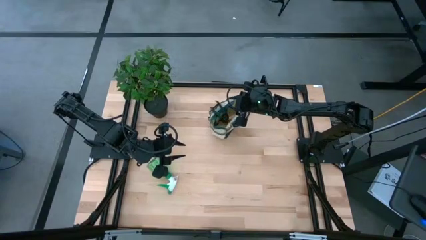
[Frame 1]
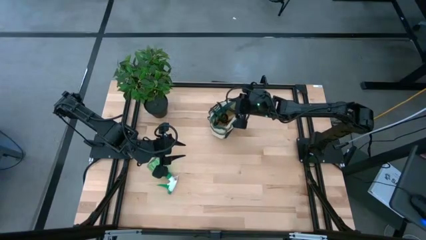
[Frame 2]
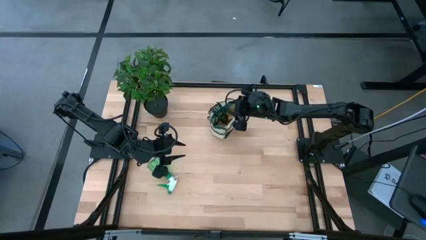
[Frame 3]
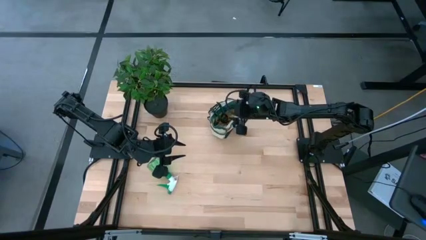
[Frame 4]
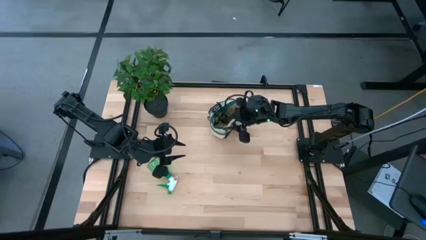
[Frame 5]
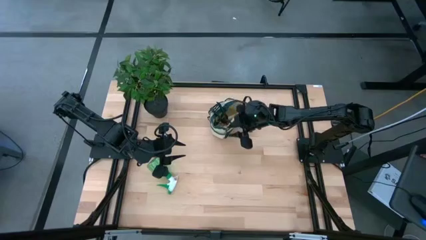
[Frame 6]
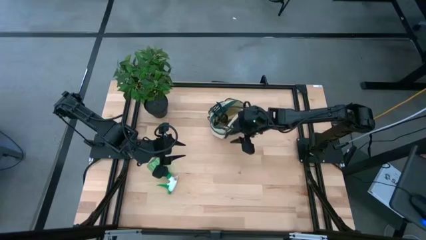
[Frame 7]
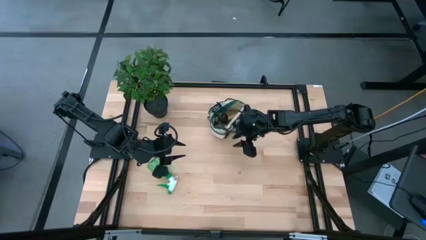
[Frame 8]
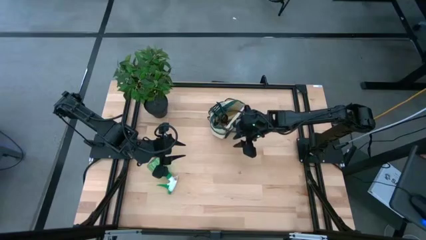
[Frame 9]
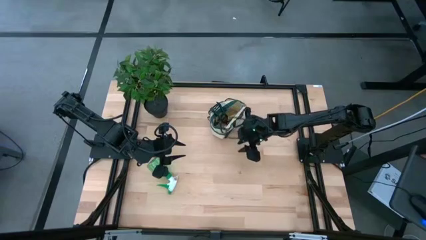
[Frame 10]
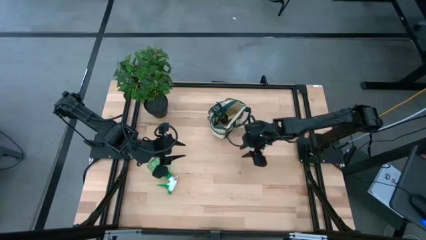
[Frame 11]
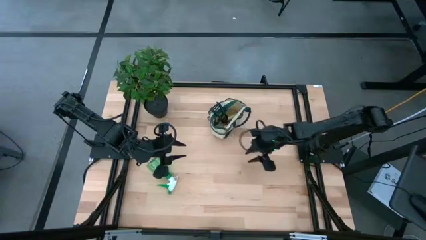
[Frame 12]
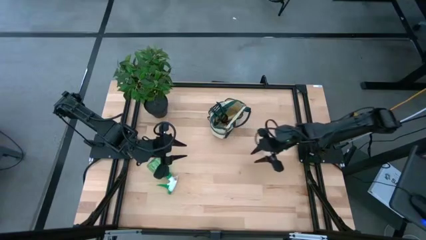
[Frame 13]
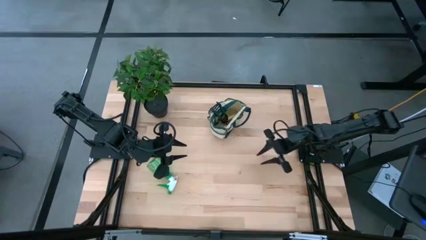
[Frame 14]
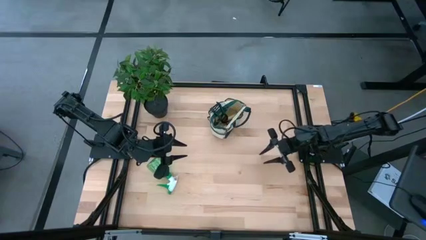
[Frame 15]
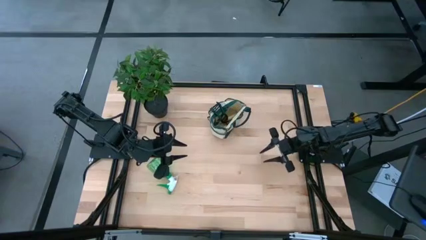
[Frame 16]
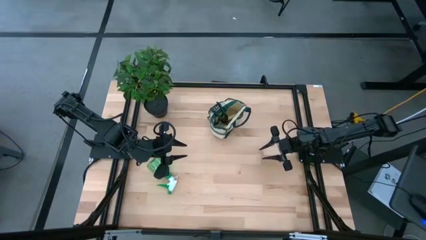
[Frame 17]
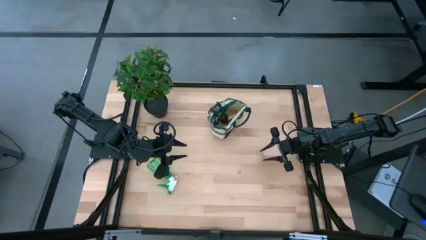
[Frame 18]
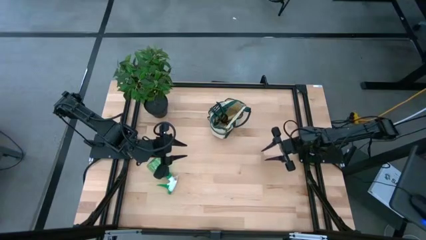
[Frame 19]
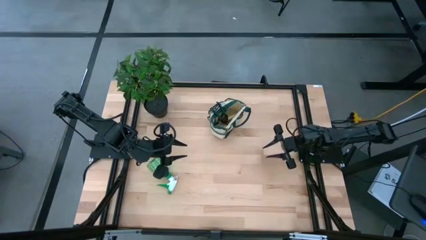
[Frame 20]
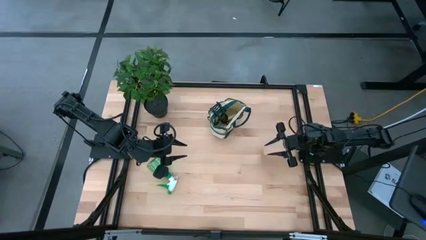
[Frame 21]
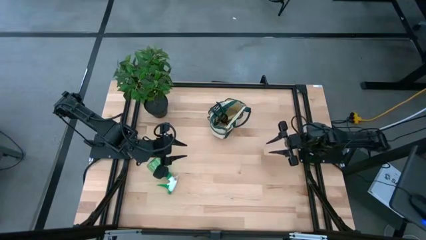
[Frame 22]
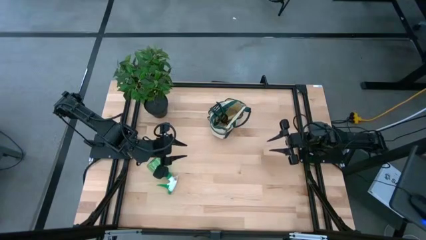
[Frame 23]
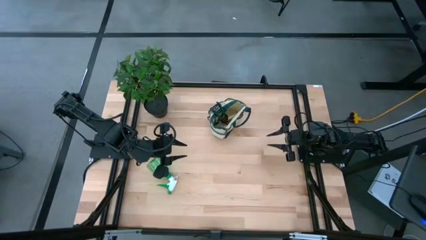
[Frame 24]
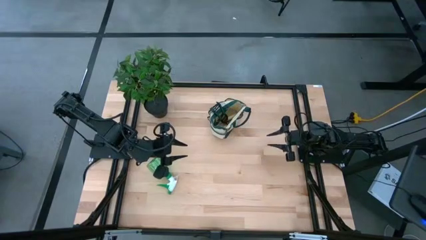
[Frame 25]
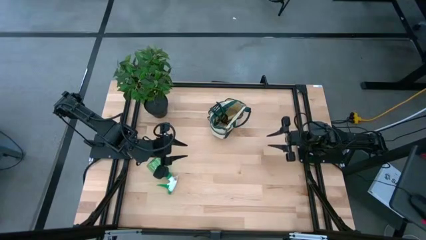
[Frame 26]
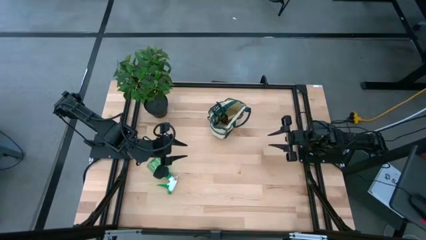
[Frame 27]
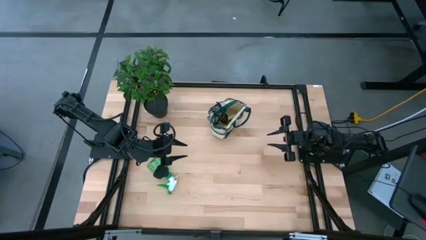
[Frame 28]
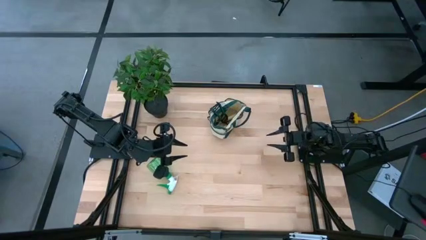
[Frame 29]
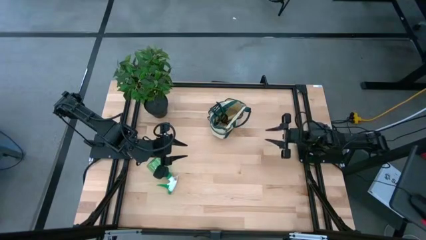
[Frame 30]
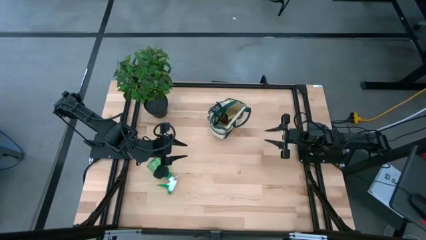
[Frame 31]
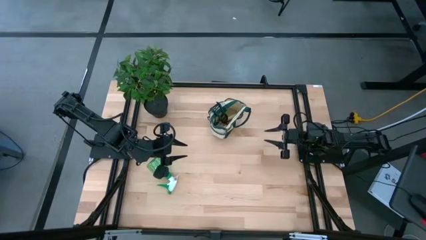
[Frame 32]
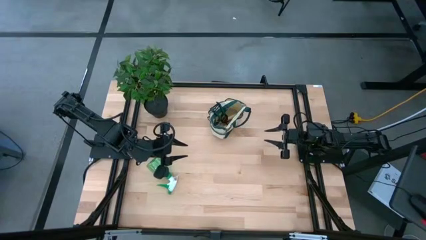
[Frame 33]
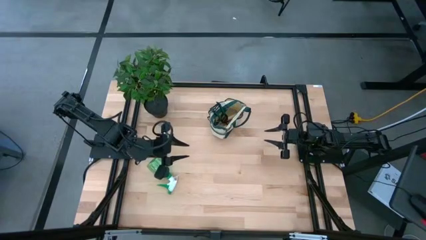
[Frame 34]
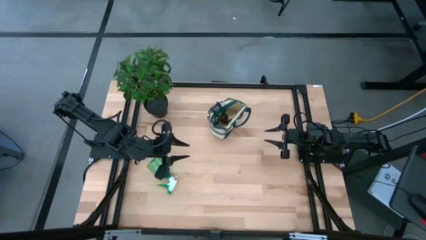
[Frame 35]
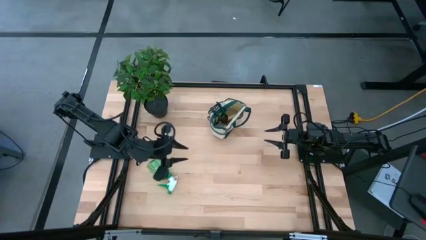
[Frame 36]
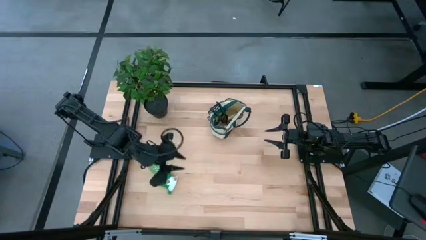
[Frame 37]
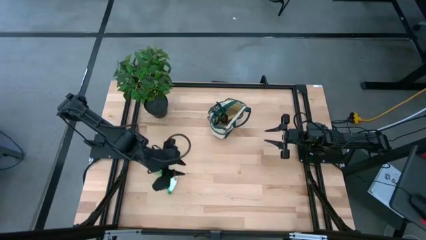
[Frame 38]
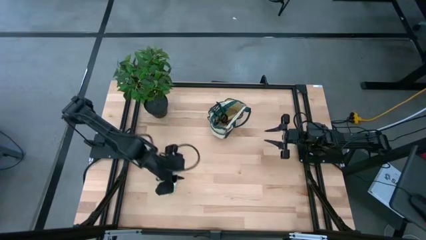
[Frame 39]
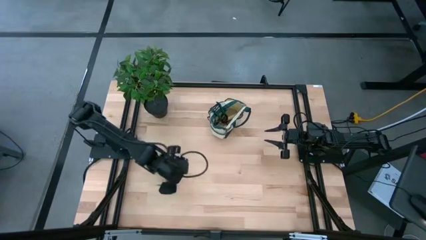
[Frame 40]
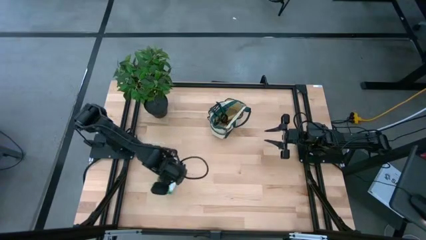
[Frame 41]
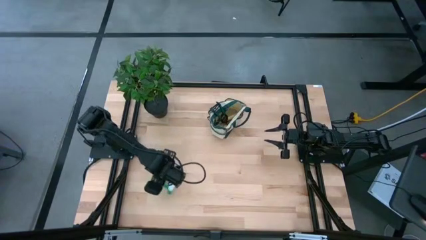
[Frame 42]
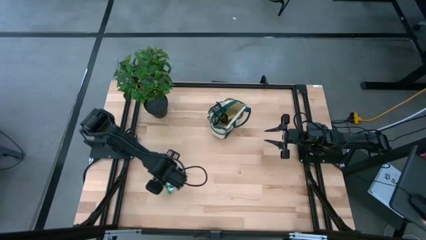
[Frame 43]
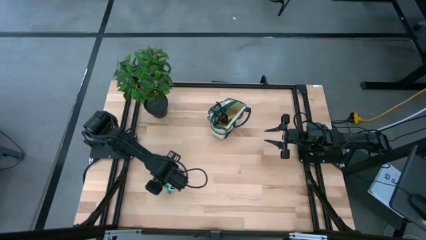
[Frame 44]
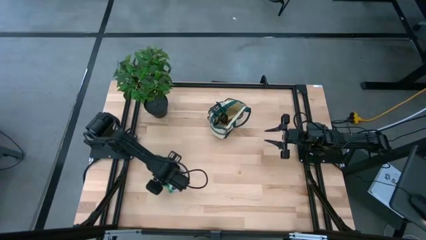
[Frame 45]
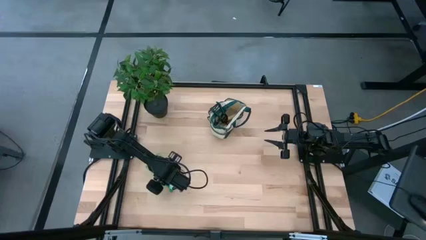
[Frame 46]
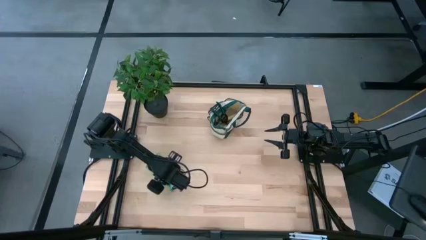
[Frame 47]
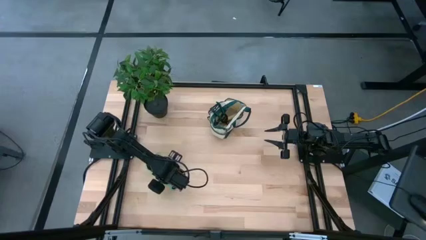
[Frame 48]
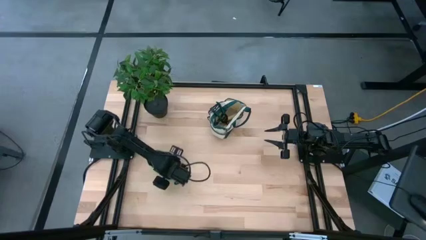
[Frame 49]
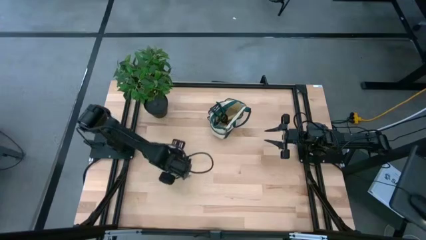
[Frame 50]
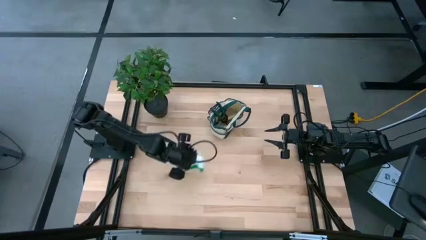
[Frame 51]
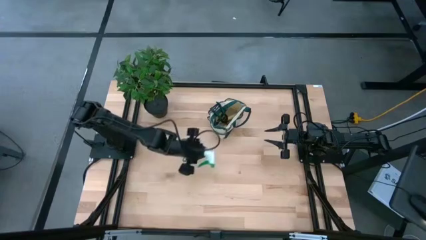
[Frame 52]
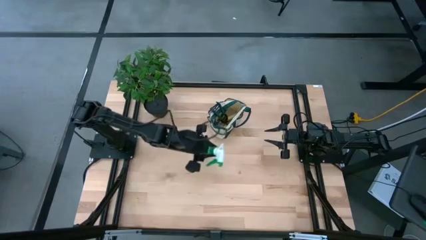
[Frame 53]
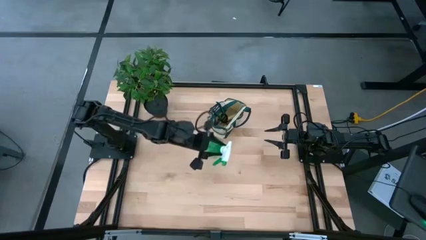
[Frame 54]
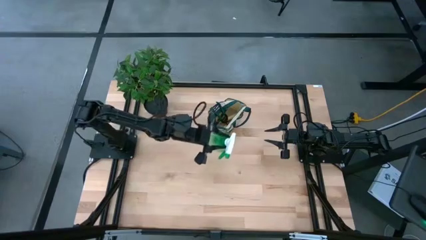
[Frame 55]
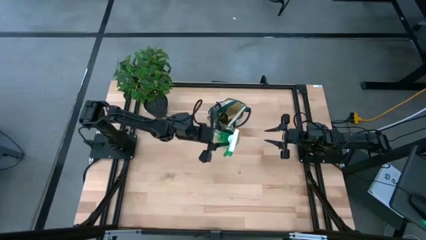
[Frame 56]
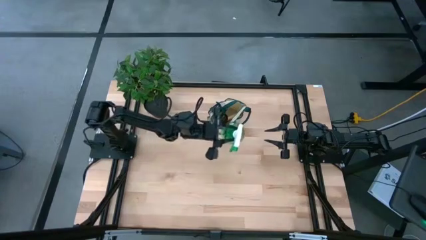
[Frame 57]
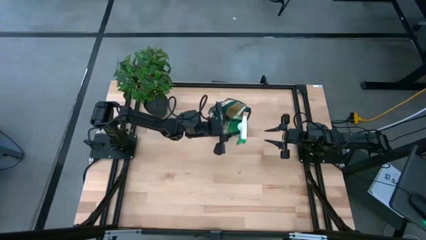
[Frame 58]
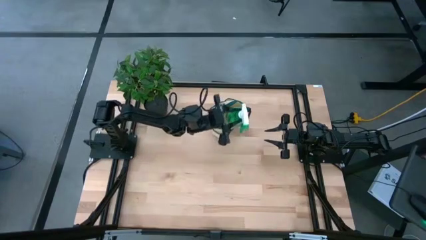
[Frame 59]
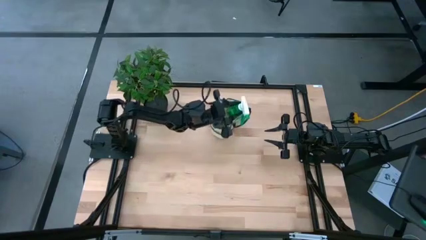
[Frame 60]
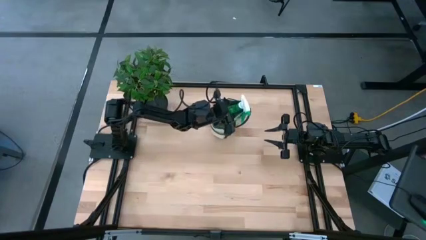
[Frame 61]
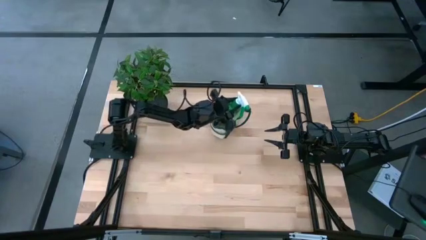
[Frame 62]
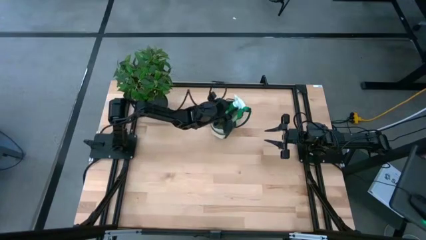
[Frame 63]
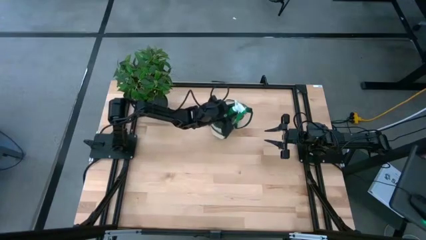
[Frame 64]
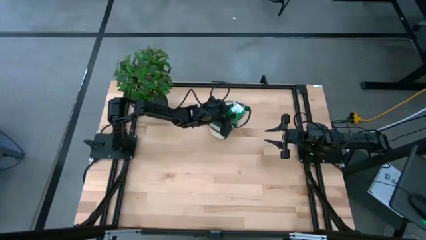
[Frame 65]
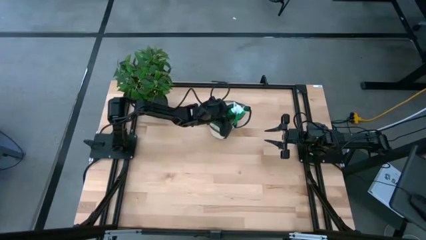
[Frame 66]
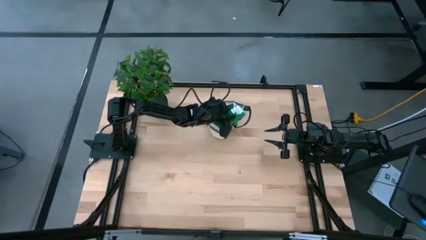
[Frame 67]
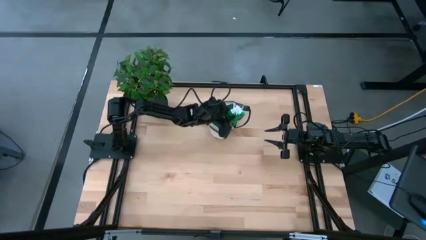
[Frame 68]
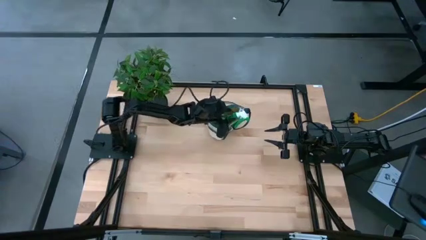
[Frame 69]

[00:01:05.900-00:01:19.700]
Task: Pick & Place Garden tools in Gardening bag
Put the green spray bottle into the green gardening bag

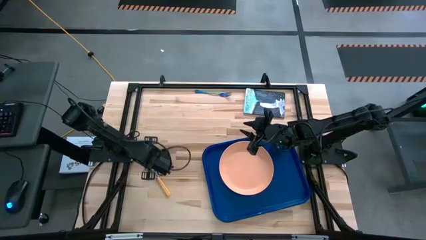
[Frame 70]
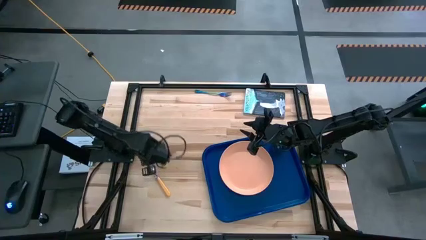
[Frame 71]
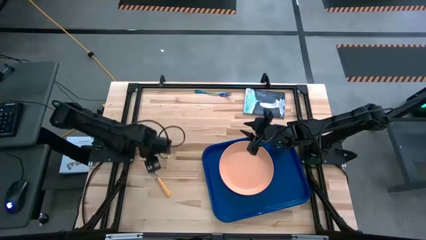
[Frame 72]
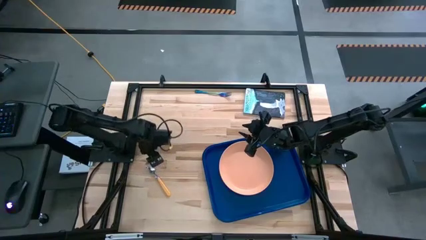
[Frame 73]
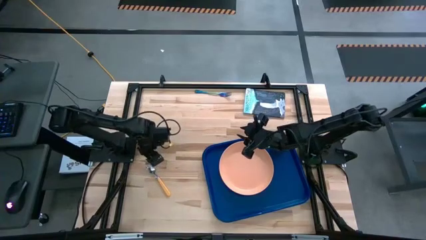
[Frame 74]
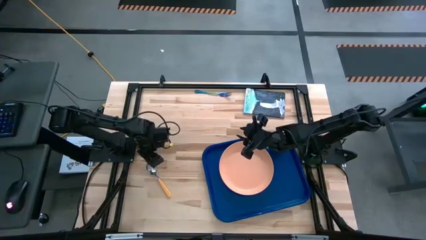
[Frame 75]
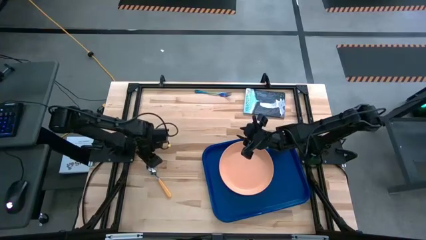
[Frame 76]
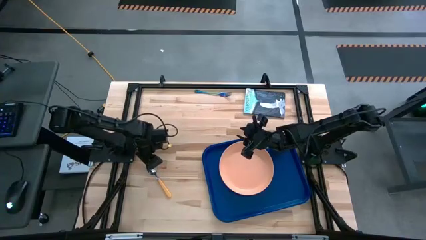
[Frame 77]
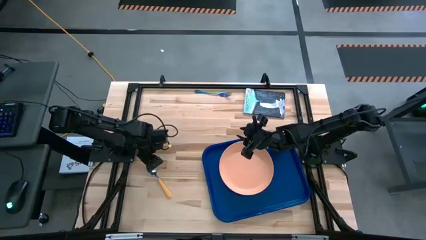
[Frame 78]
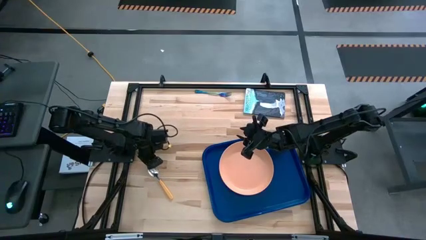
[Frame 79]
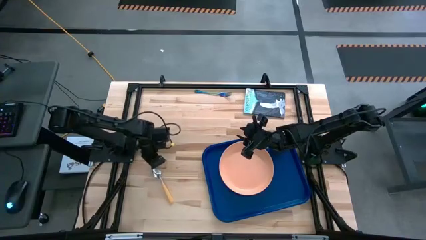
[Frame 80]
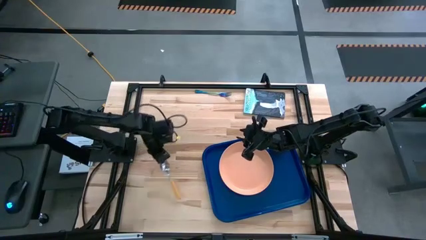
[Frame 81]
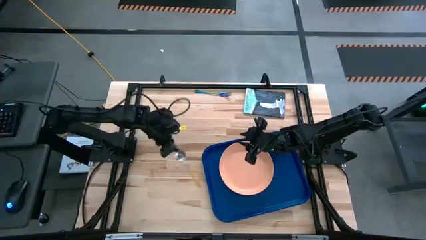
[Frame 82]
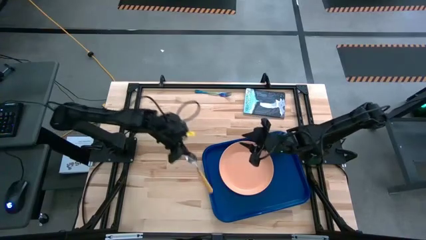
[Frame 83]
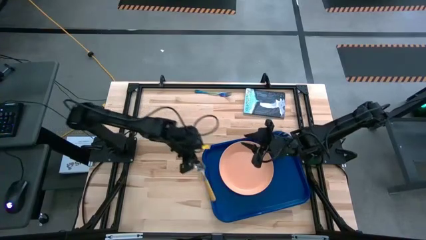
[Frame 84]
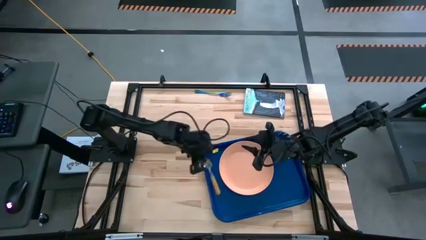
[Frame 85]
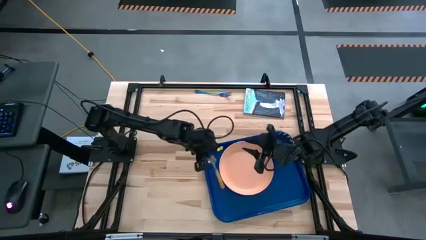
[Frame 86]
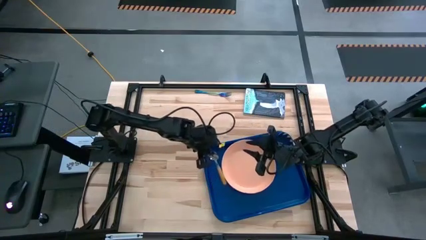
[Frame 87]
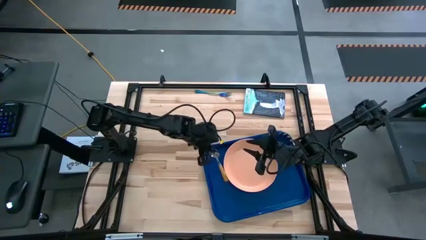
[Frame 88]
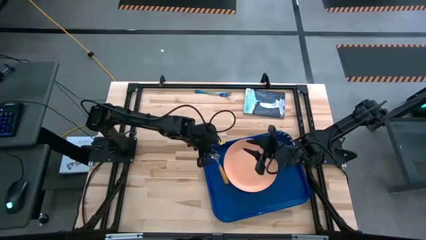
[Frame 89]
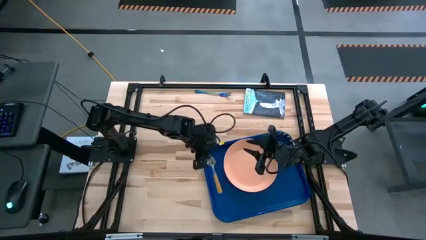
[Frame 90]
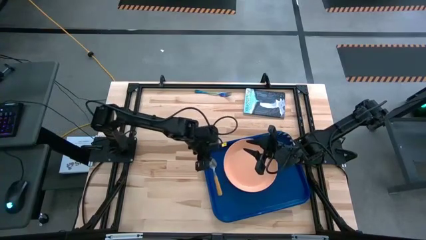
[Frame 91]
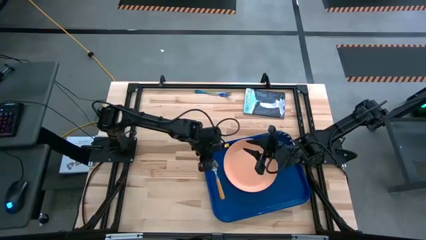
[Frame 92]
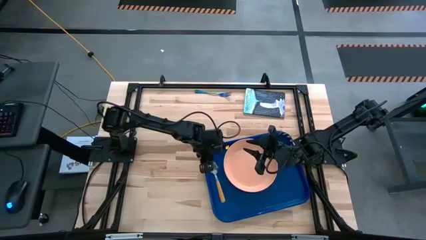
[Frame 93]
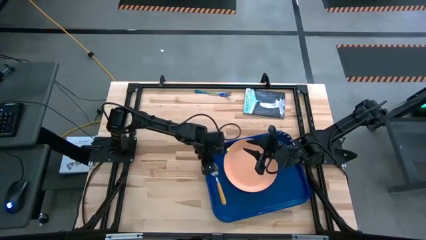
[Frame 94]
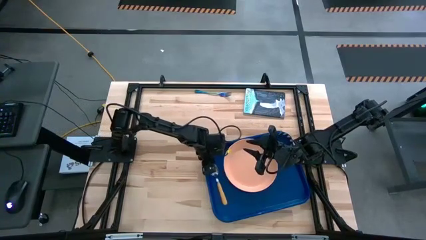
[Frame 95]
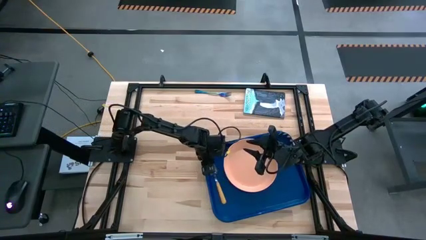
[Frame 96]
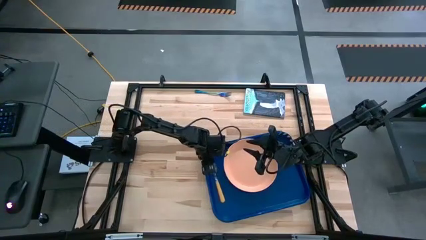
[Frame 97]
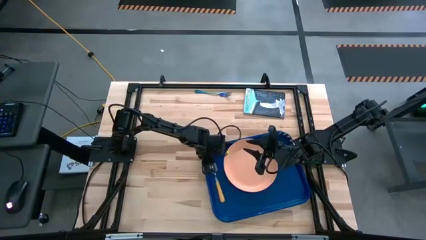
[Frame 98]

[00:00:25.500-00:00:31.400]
Task: Pick and place plate/cup/fork/spoon on tray
Put the orange spoon on the blue table tray to the left of the orange plate
